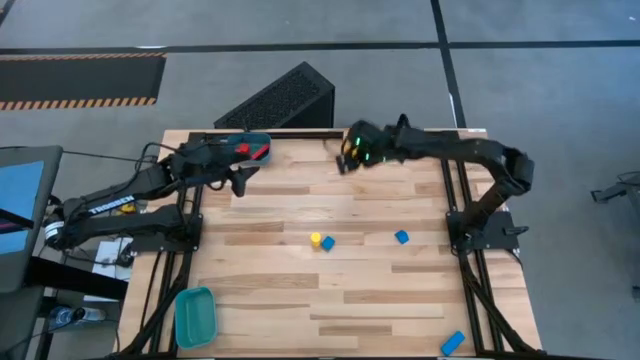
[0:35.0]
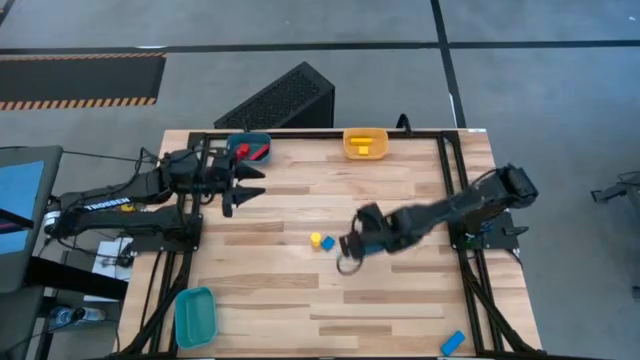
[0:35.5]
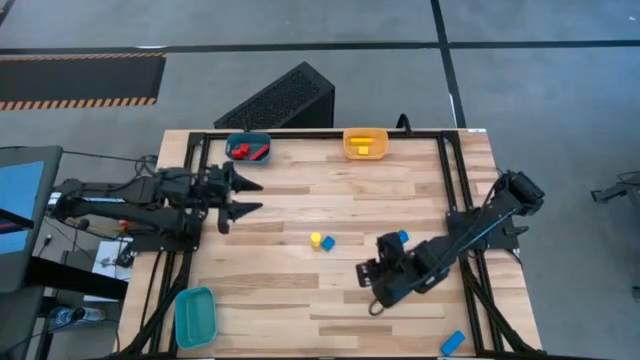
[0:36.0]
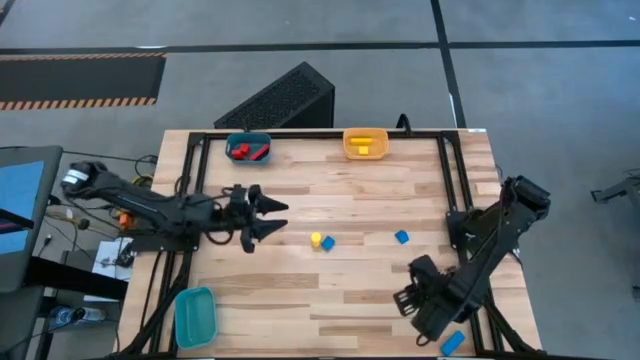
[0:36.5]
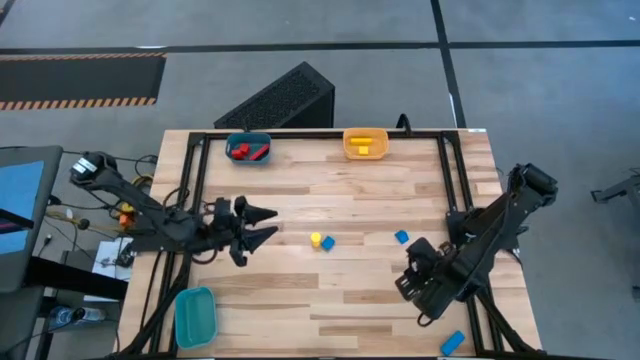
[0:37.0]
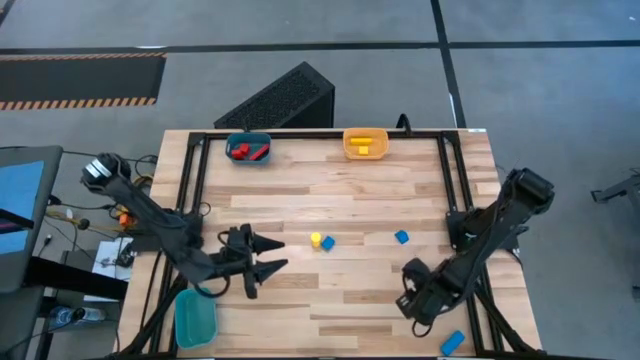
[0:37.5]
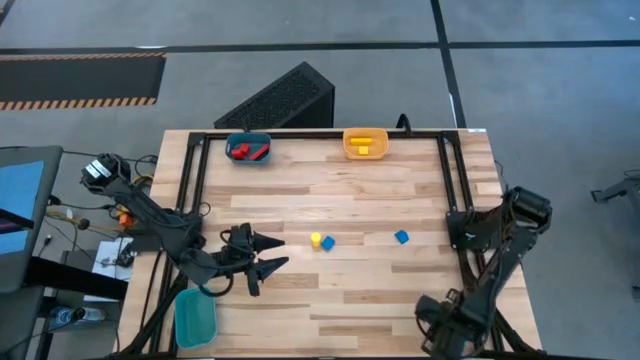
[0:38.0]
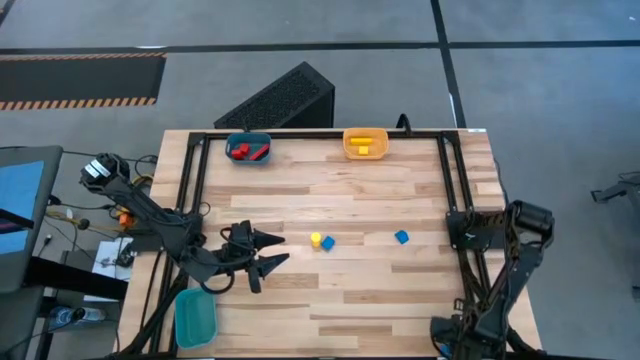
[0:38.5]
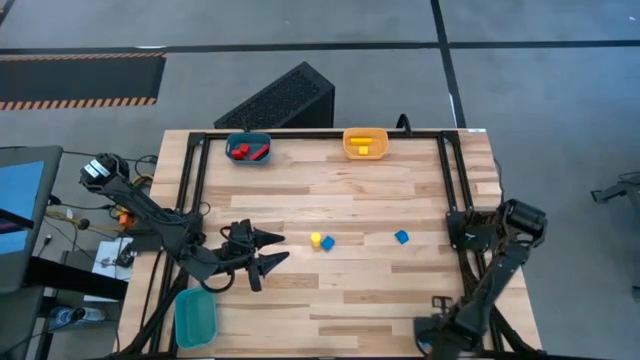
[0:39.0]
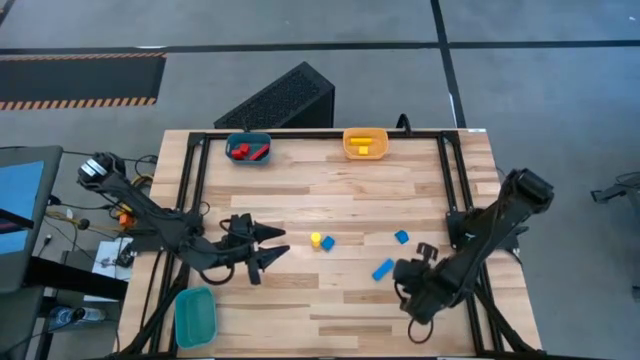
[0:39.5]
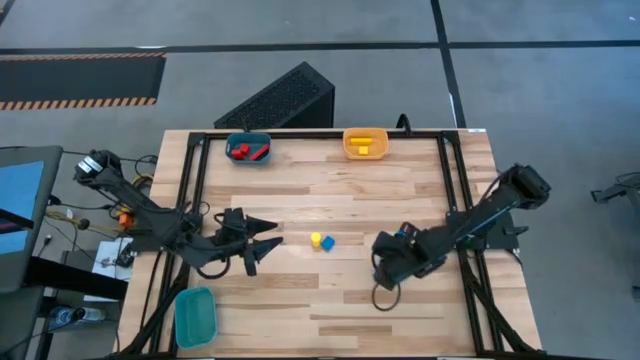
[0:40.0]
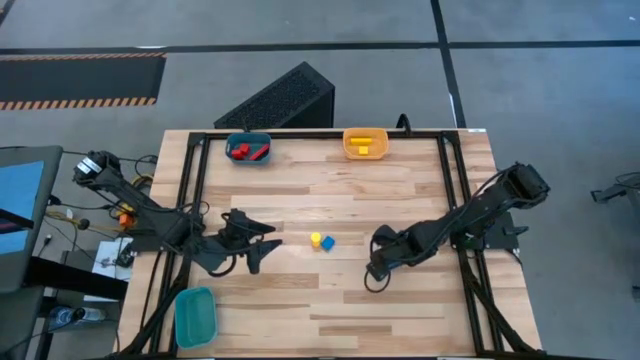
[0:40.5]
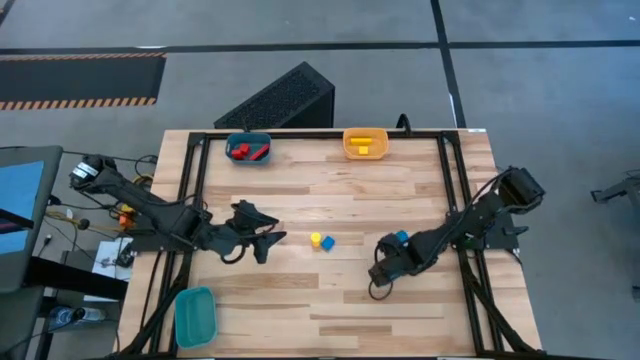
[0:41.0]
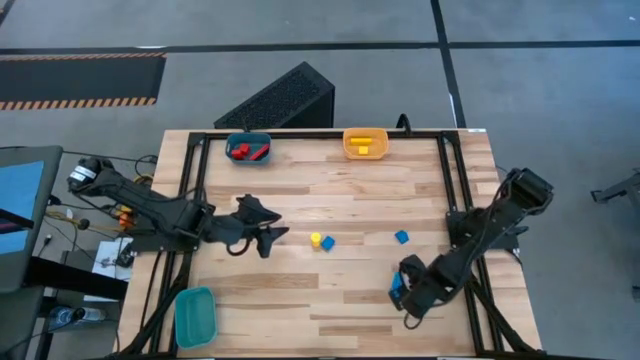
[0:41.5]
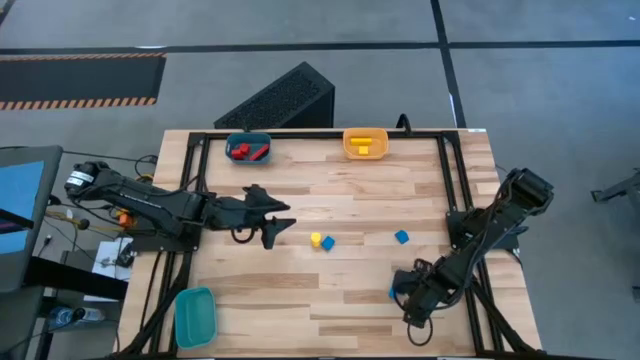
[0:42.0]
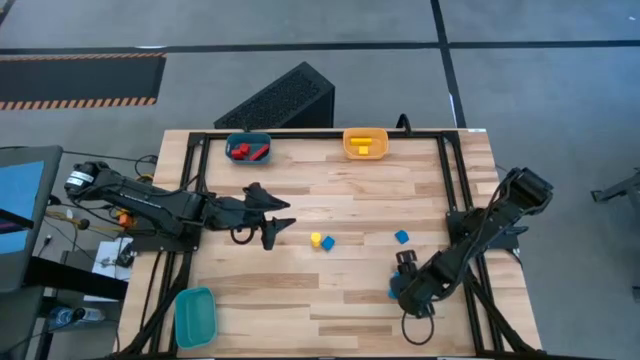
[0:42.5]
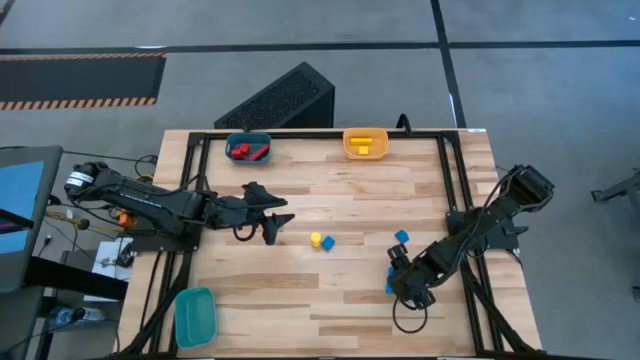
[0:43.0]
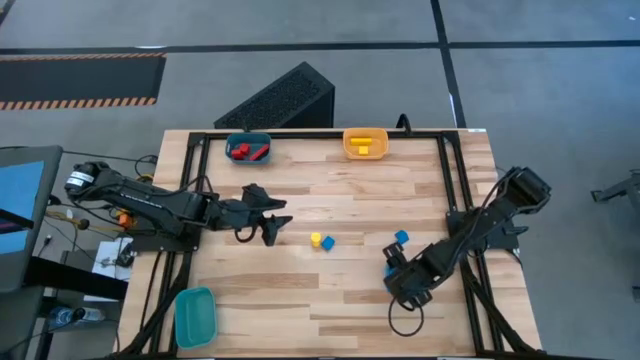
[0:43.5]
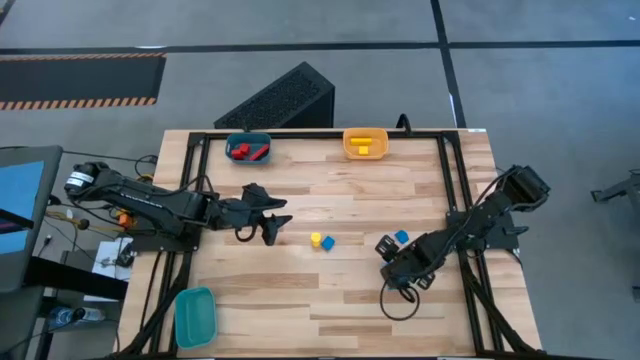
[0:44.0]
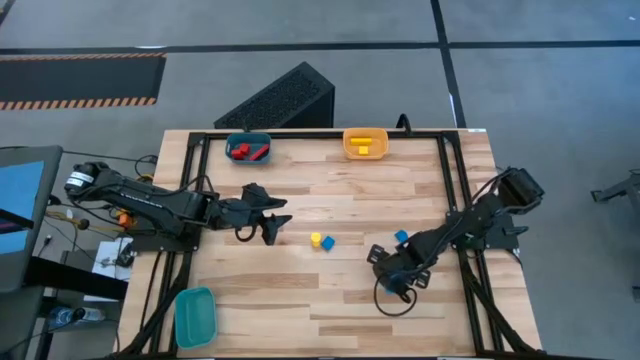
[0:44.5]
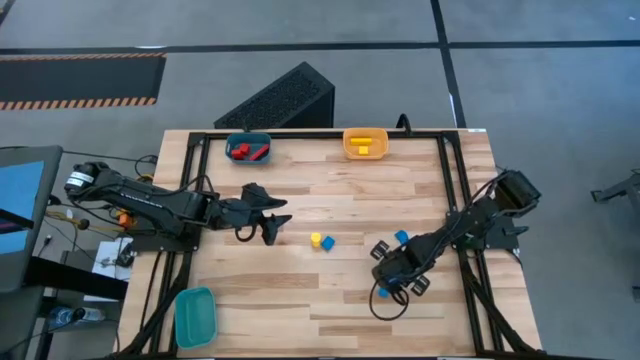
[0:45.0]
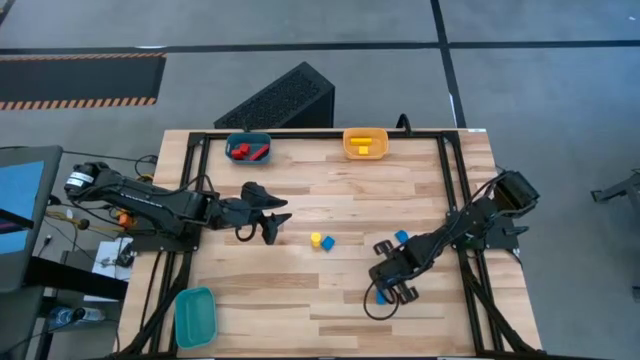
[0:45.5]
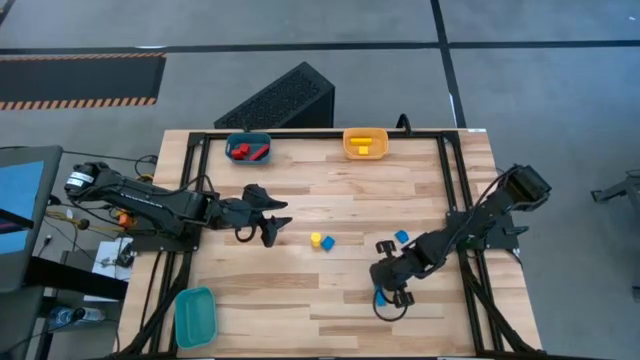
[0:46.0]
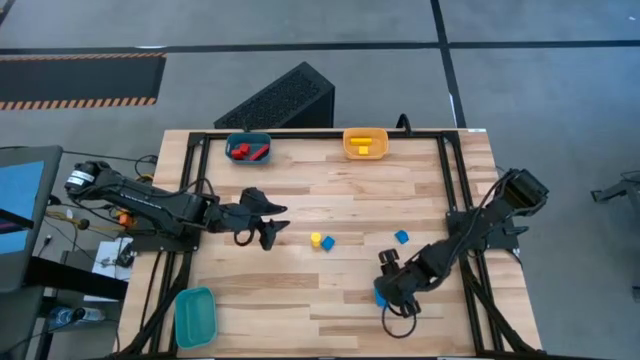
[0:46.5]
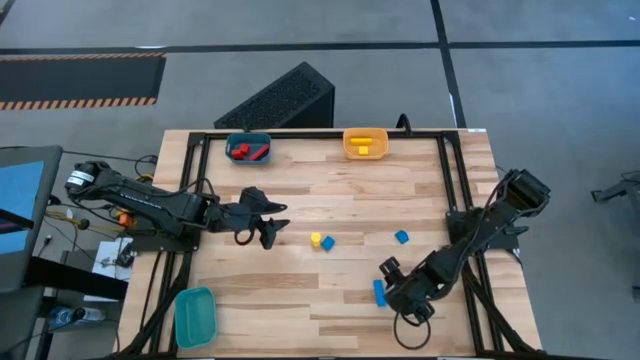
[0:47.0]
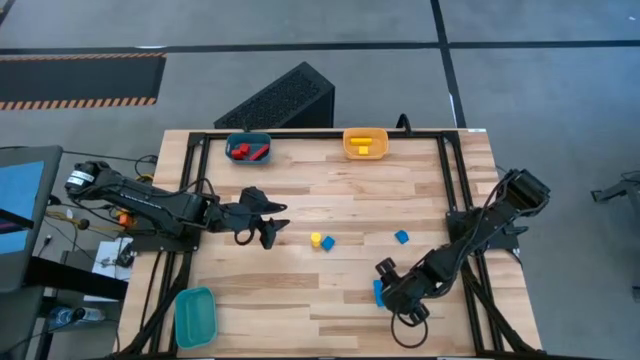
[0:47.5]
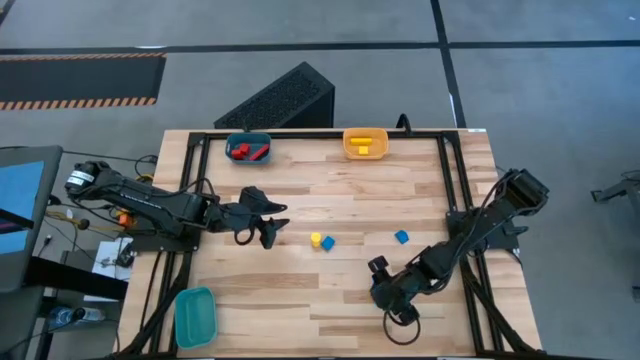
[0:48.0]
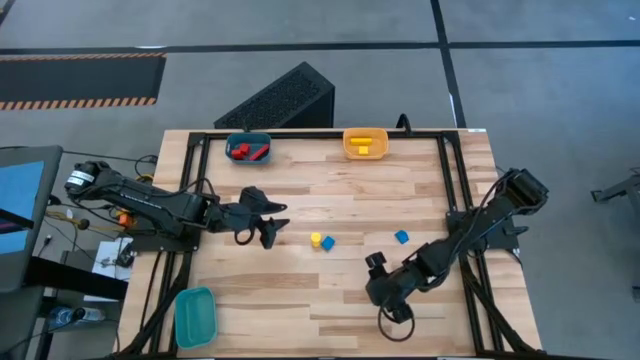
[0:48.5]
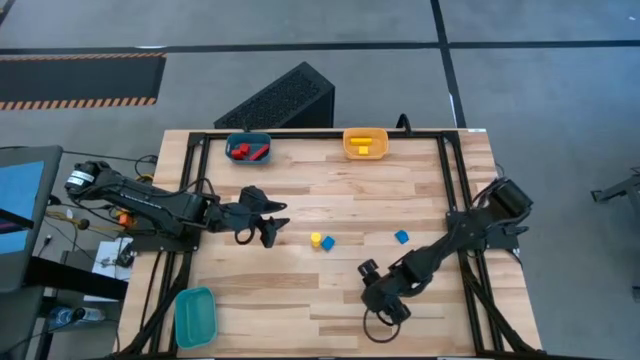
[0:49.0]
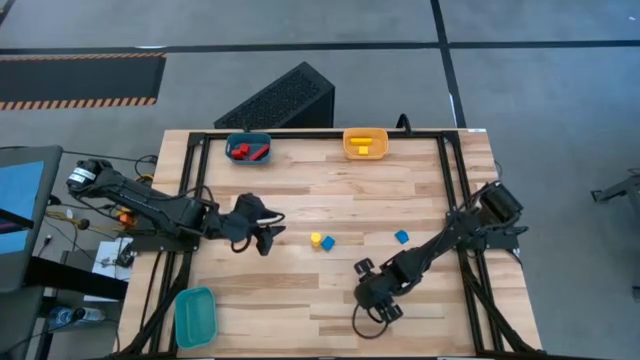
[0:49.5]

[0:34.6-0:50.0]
Task: Sort & place blocks by color
Put the bottom blue block into the green bin

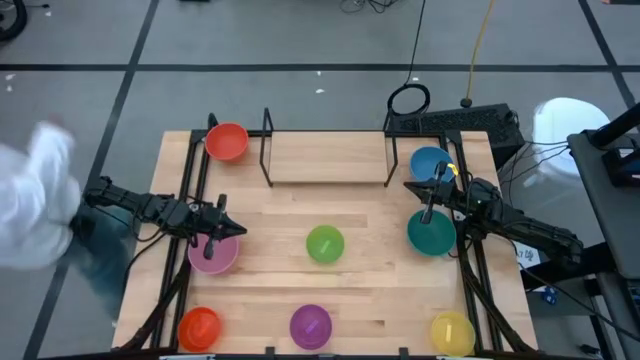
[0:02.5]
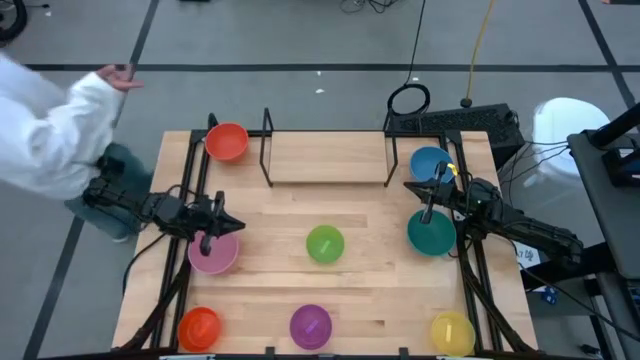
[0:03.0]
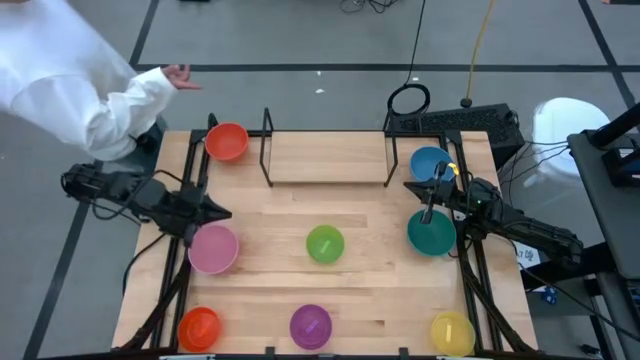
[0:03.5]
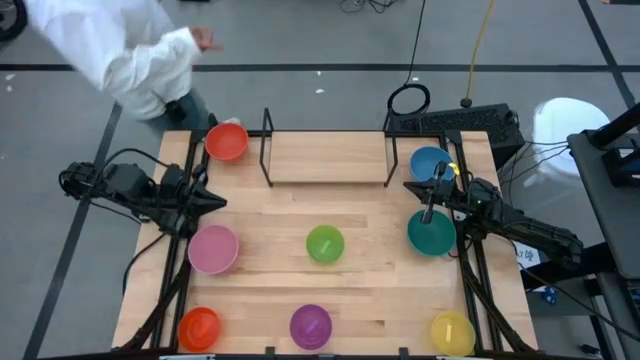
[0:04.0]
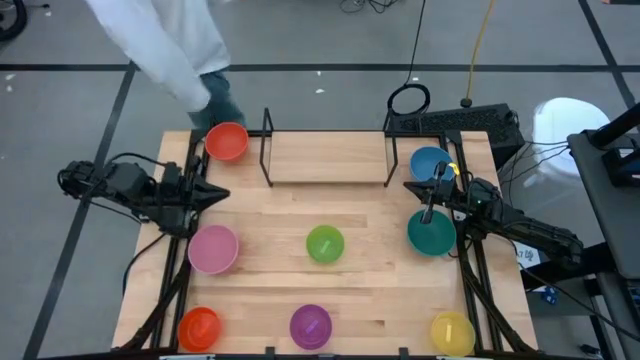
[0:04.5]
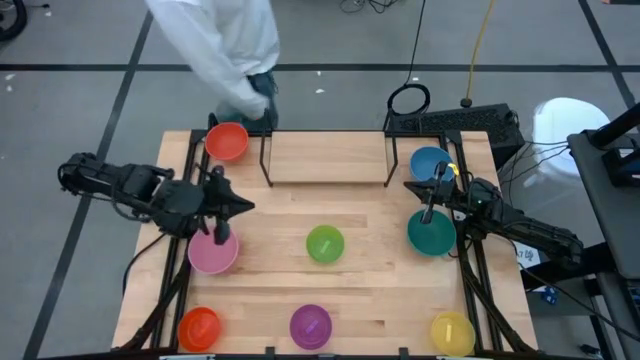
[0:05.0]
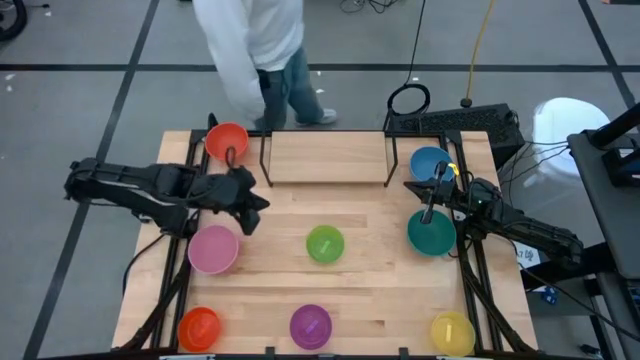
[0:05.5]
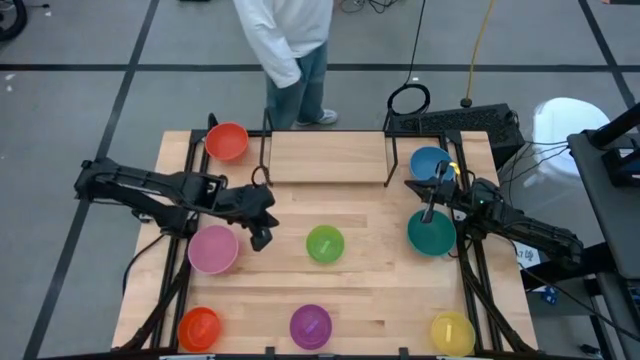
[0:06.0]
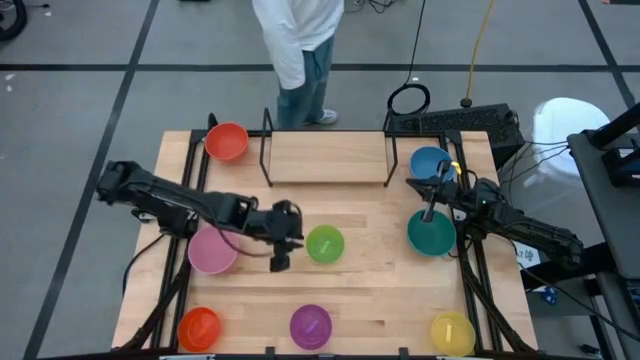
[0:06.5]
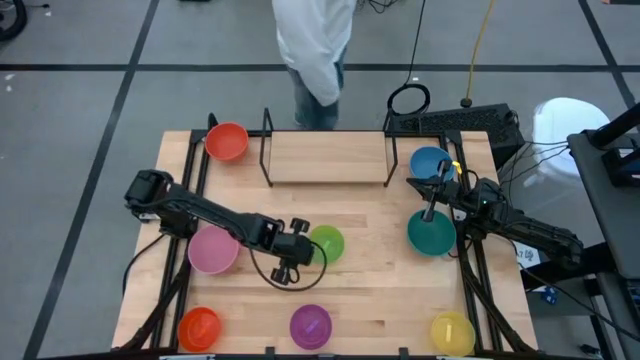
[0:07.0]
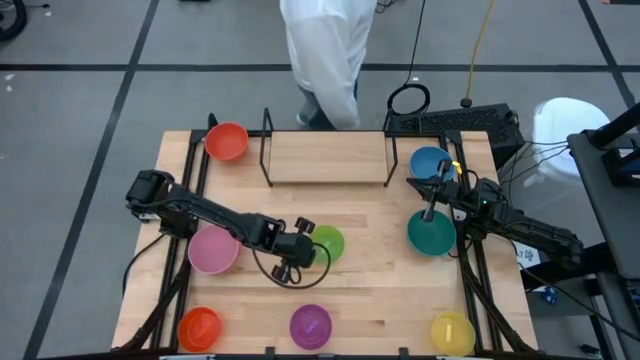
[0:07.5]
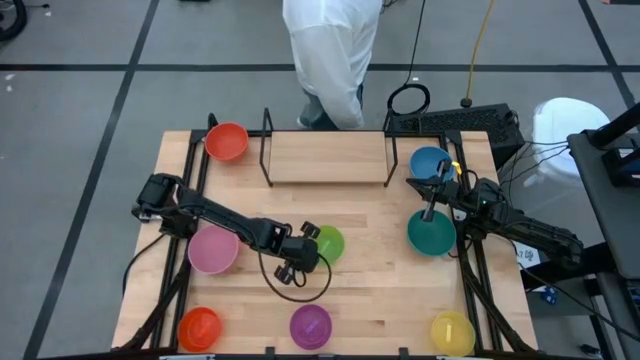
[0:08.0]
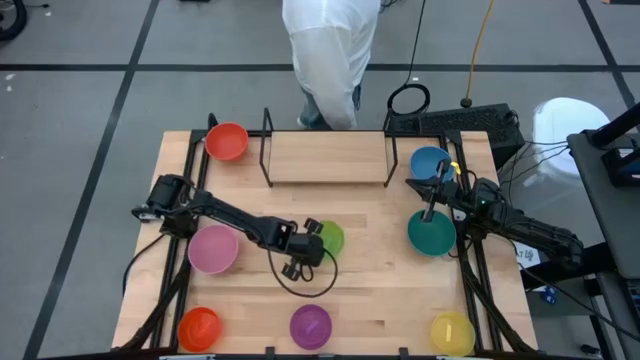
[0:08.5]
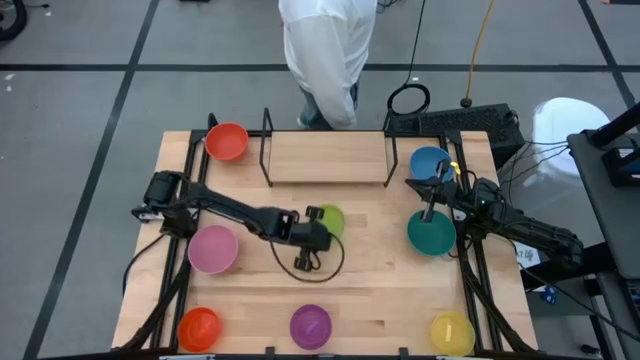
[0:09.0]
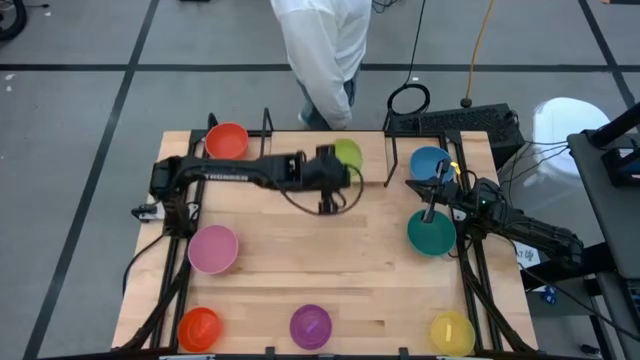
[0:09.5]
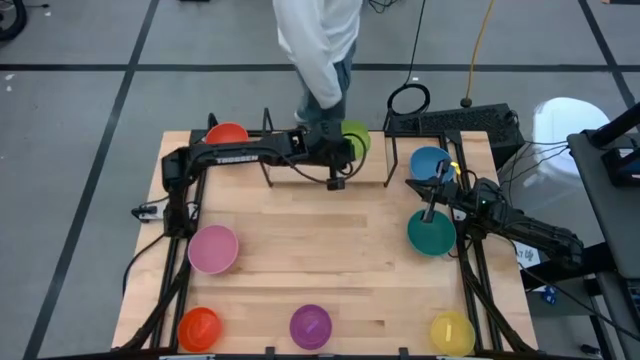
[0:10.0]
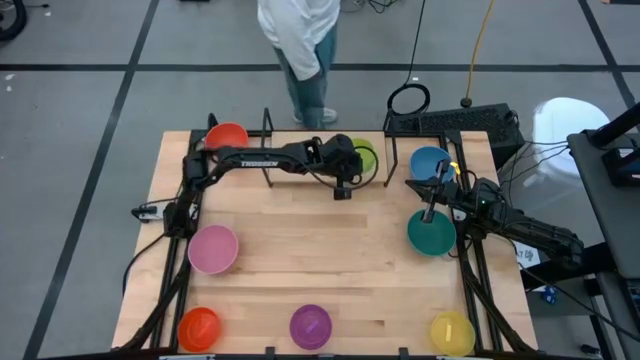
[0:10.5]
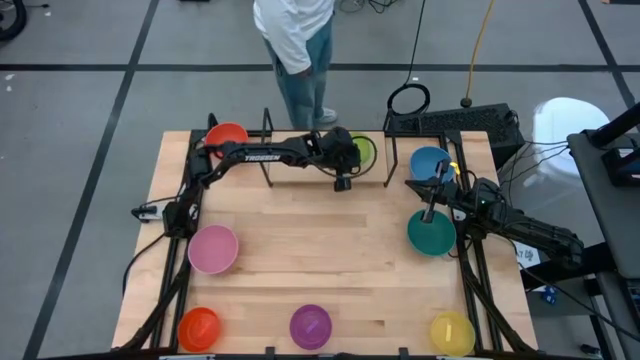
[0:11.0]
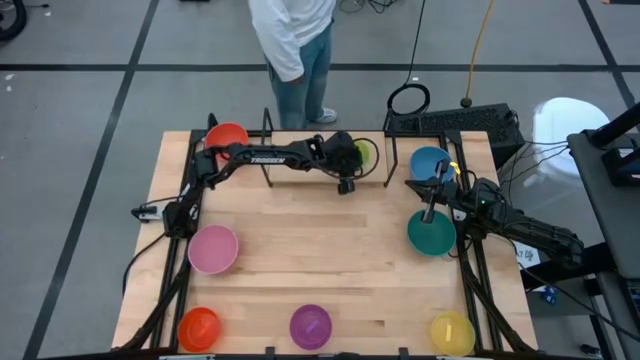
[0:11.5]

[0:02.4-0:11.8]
Task: Place and stack bowls onto a shelf
Put the green bowl on the shelf
